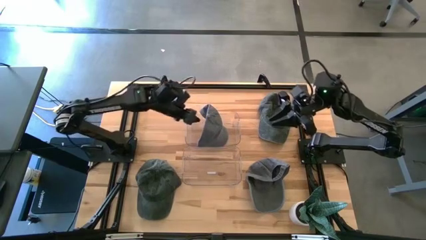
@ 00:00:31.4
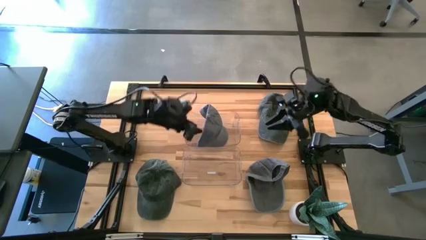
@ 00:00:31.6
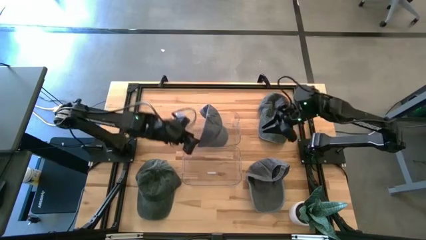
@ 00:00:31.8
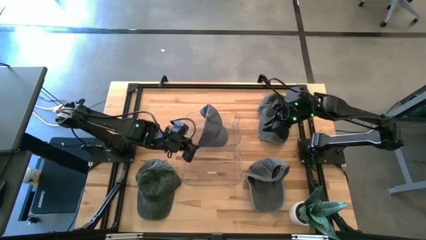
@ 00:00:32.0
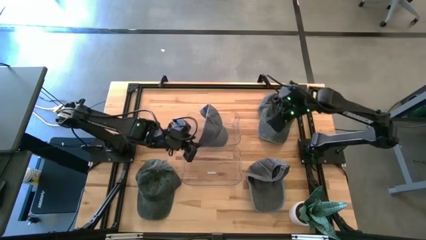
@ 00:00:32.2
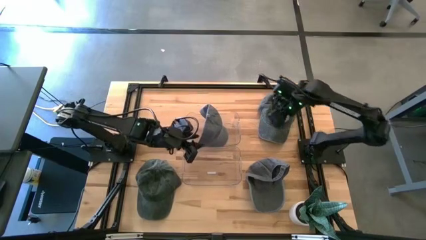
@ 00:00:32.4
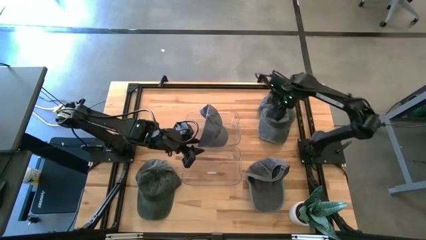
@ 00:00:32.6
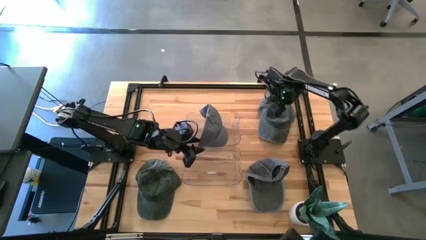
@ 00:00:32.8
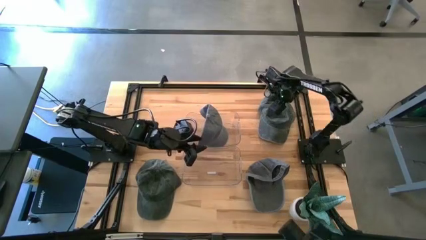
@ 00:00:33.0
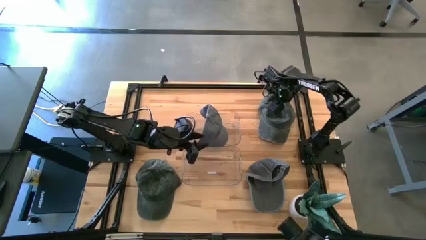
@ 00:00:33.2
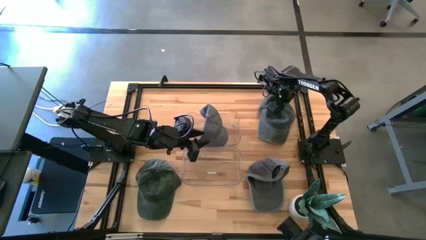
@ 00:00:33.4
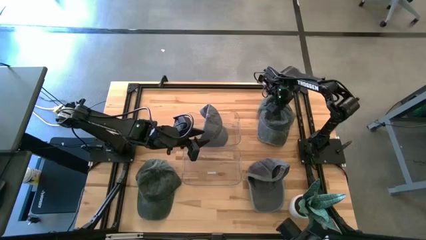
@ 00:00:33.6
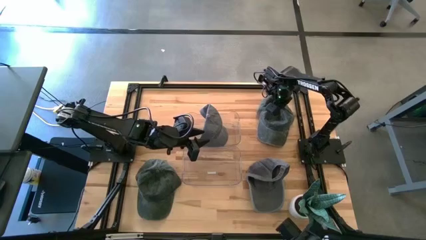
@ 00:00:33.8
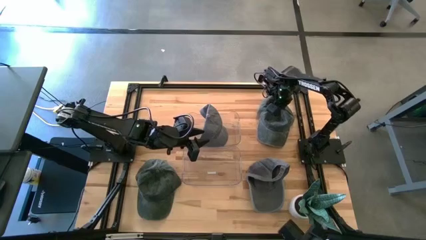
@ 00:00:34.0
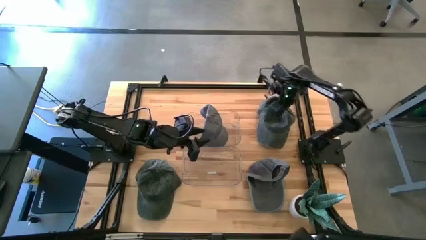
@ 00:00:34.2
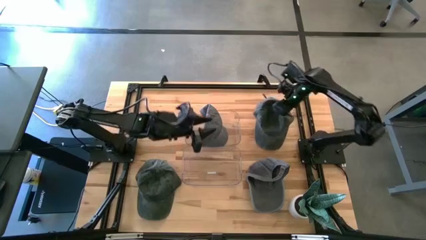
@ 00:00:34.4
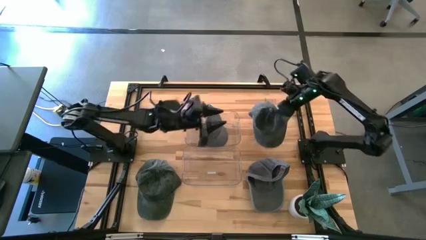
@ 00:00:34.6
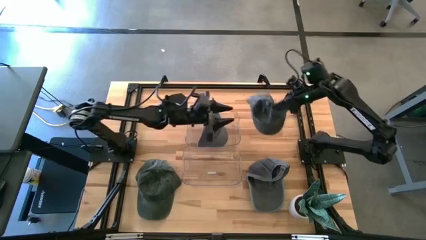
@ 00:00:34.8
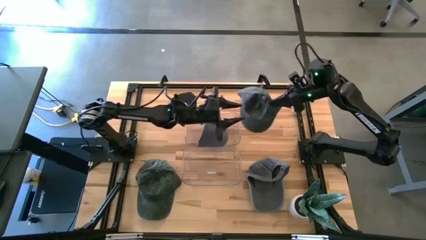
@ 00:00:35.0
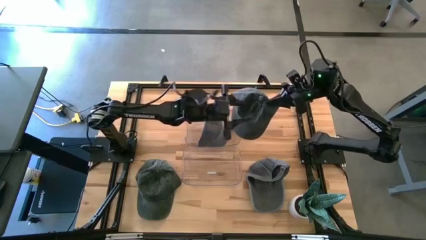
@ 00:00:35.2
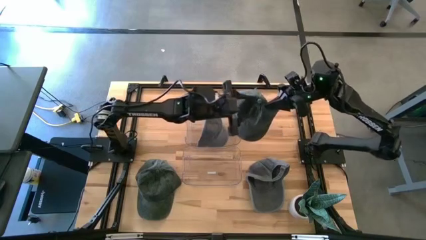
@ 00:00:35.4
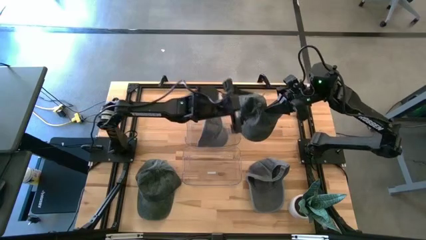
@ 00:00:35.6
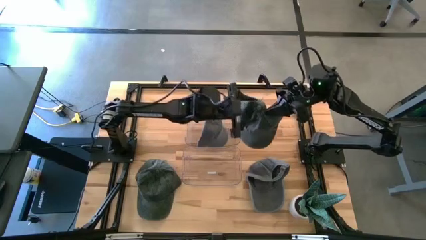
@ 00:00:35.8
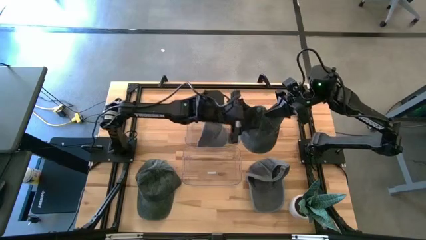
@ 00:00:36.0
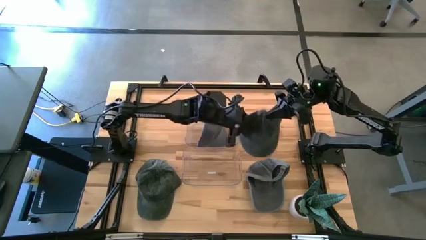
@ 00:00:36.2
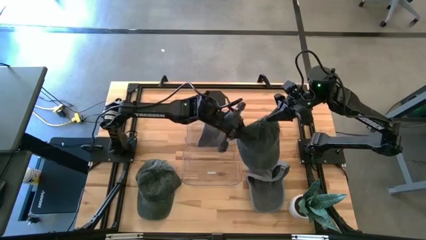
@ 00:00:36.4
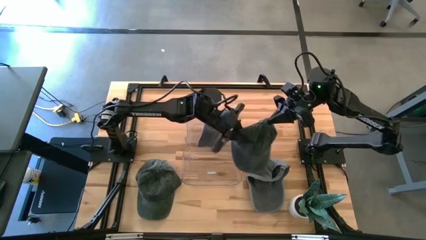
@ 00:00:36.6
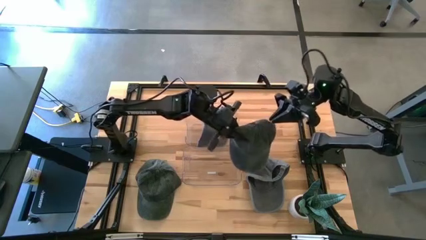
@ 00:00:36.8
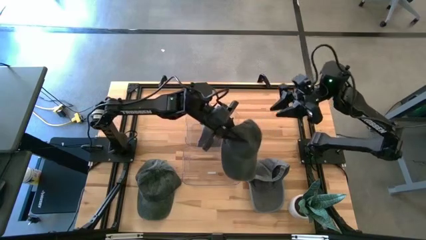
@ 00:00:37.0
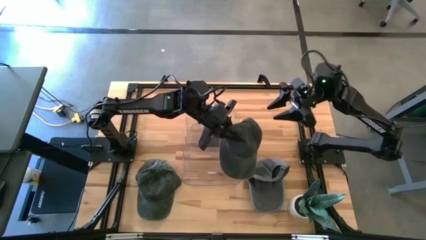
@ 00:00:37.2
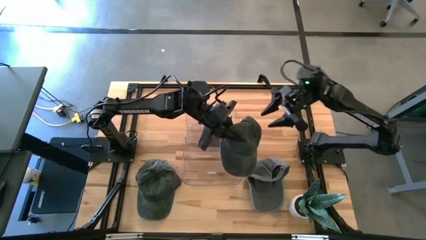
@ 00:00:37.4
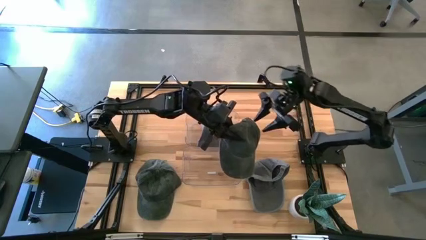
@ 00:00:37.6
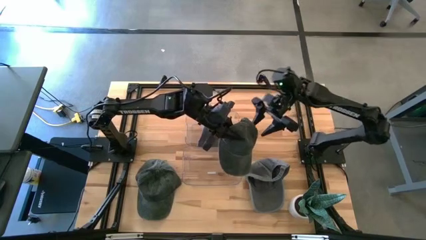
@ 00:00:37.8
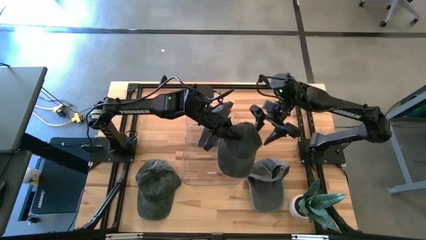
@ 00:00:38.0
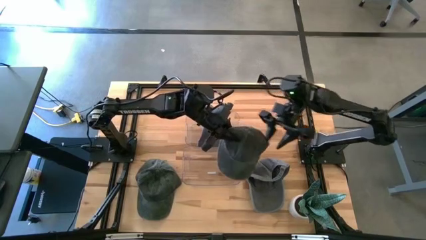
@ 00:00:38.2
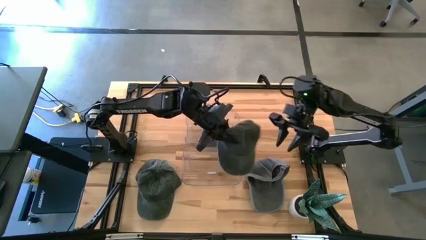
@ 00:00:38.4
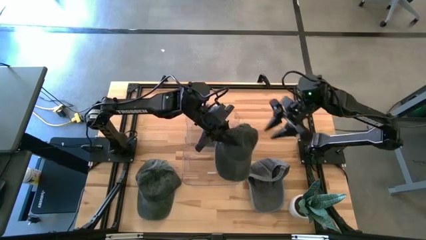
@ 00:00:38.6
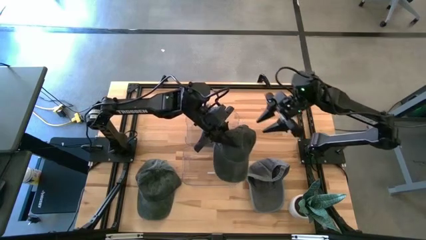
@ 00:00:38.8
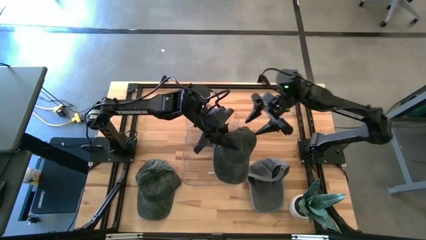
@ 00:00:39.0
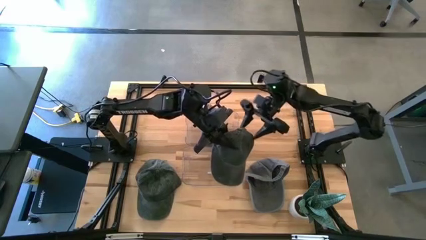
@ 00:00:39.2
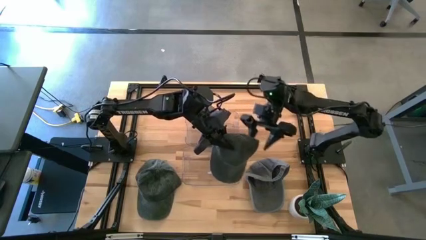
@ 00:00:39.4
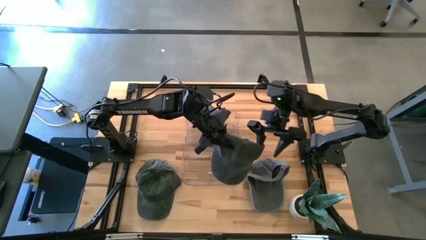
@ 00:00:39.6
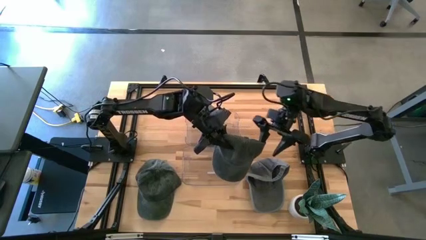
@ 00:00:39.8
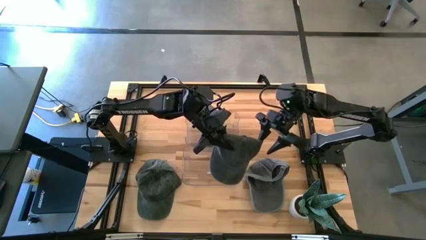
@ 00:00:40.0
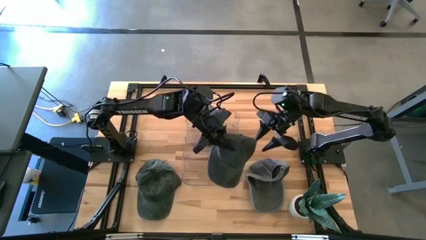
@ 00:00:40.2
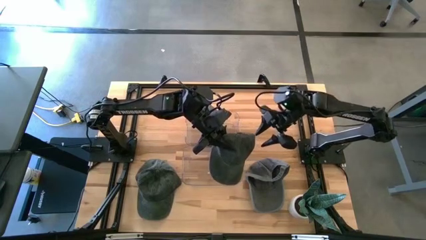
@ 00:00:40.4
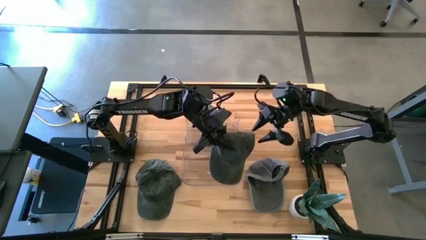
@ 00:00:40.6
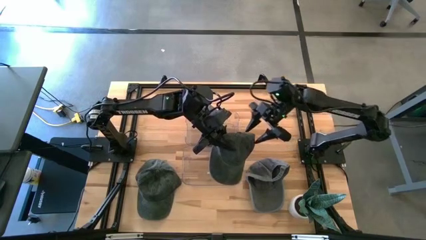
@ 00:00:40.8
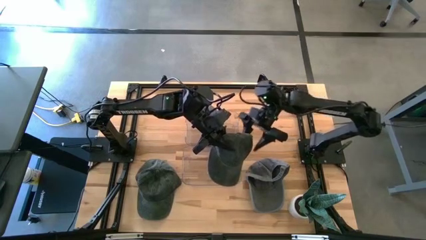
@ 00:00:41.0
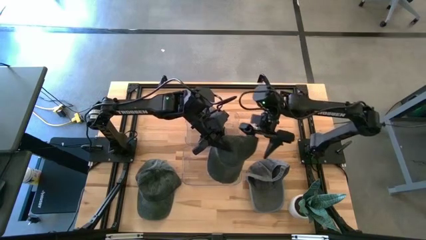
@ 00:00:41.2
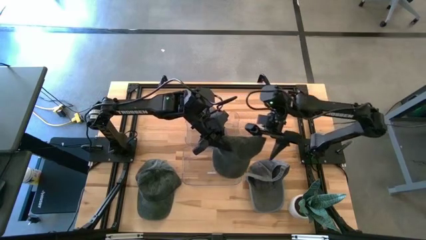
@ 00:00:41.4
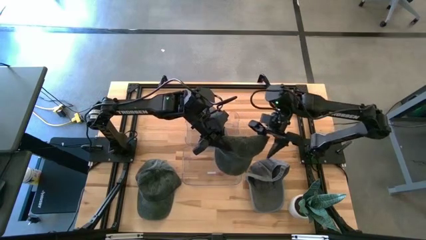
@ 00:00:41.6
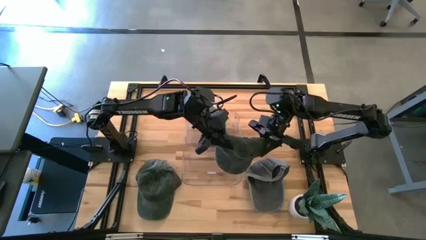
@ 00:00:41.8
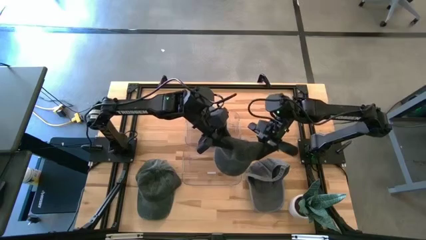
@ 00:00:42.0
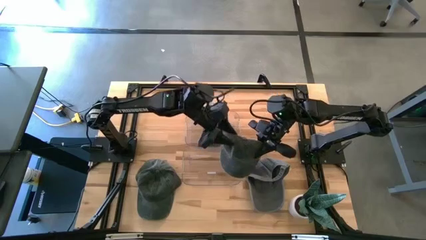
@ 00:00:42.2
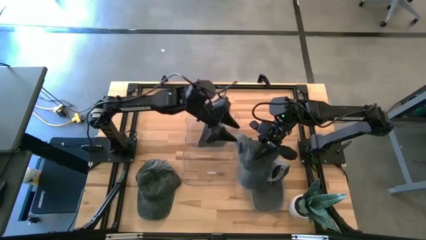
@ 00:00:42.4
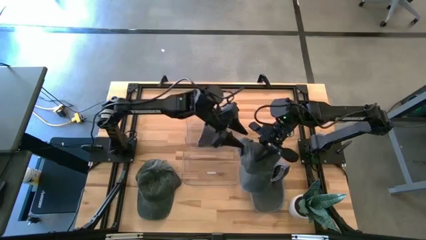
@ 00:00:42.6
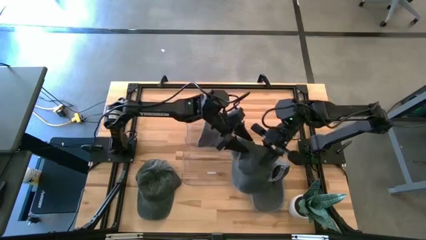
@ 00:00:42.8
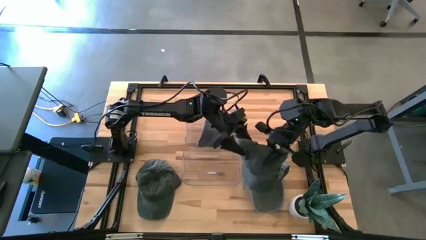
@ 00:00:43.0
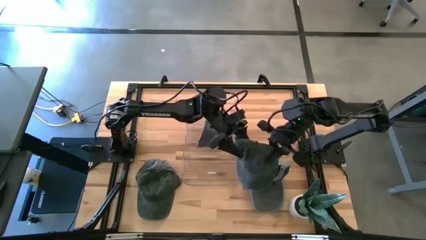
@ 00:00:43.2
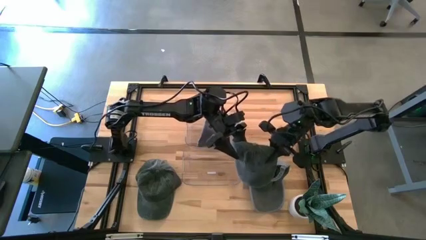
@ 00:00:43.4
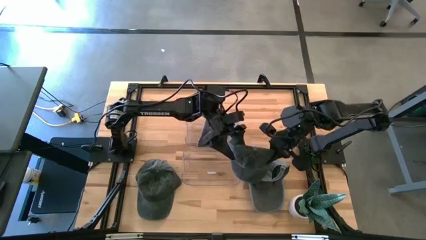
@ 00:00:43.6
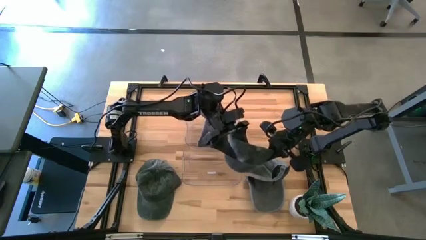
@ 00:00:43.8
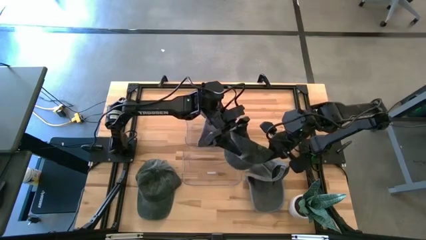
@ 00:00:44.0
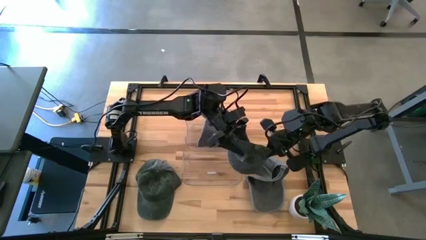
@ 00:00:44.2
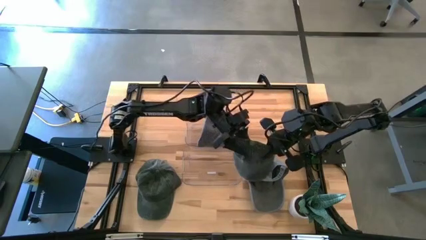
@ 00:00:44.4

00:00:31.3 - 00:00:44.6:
Task: Pick & Place hat
Put the top black cap into the bottom transparent bin

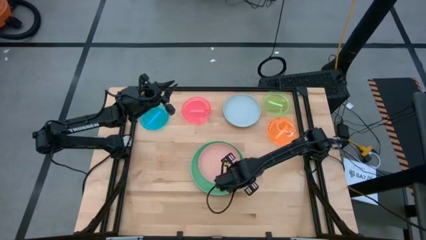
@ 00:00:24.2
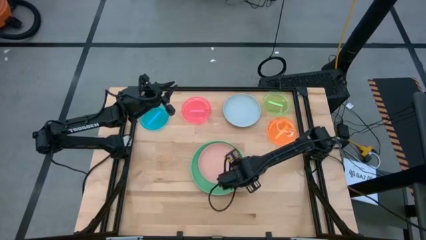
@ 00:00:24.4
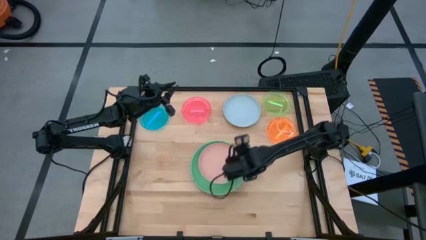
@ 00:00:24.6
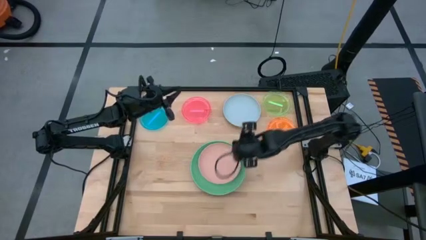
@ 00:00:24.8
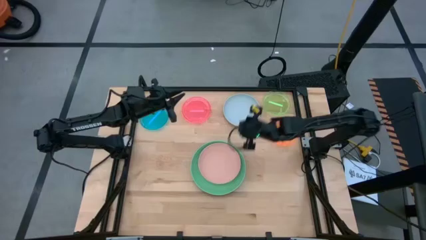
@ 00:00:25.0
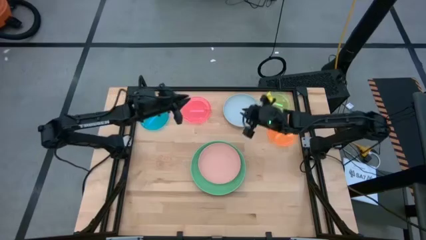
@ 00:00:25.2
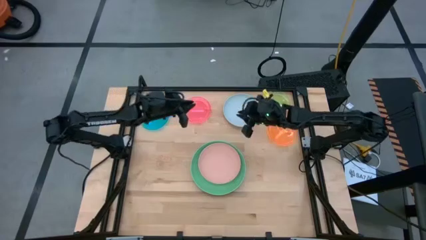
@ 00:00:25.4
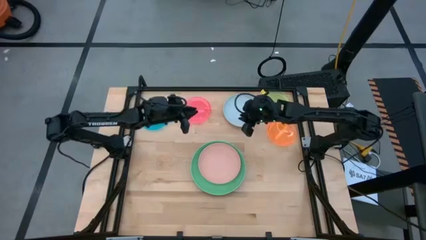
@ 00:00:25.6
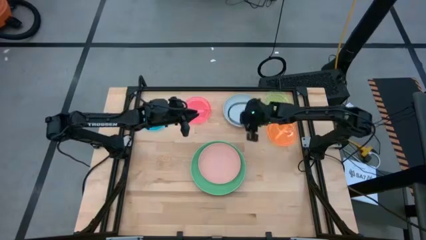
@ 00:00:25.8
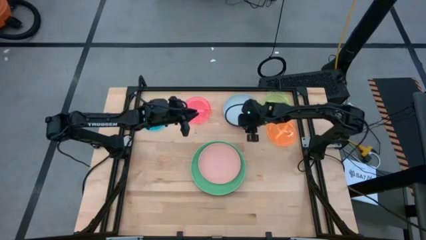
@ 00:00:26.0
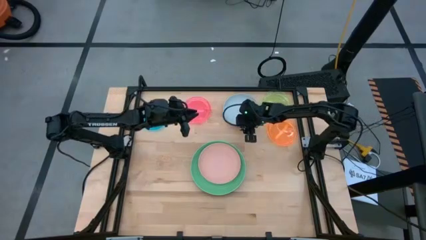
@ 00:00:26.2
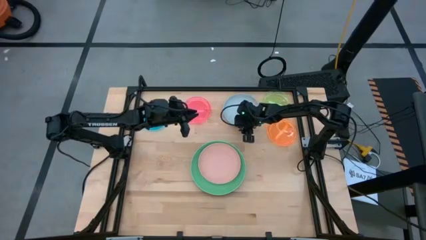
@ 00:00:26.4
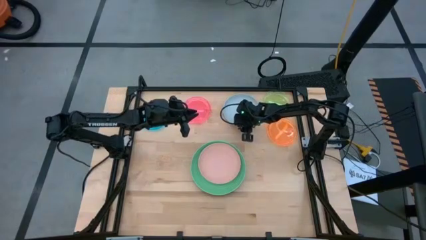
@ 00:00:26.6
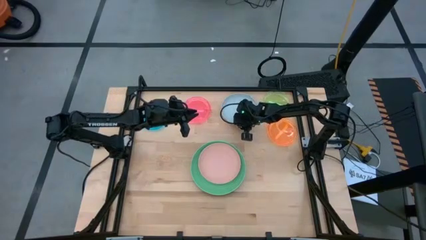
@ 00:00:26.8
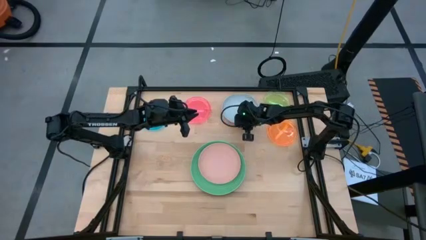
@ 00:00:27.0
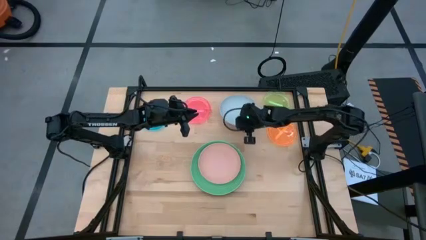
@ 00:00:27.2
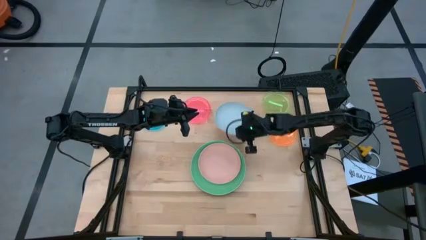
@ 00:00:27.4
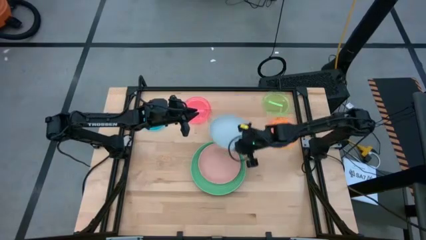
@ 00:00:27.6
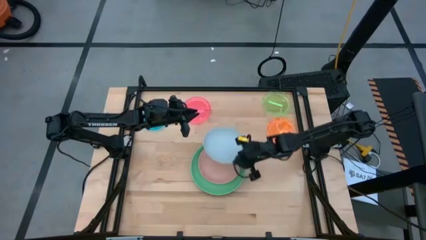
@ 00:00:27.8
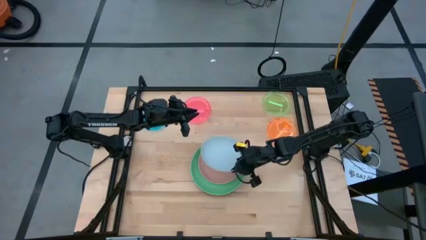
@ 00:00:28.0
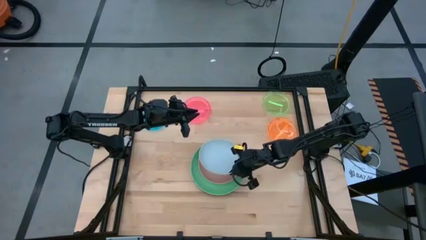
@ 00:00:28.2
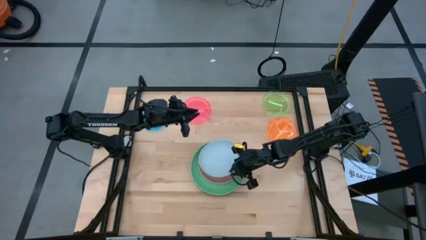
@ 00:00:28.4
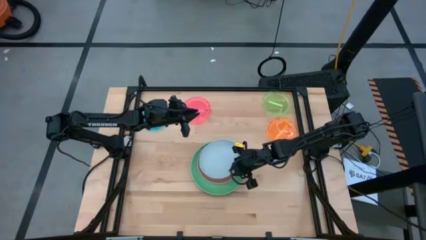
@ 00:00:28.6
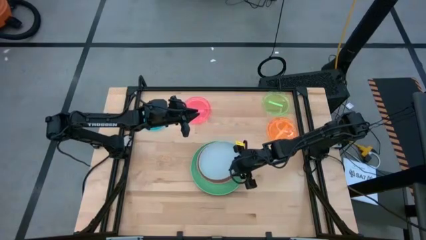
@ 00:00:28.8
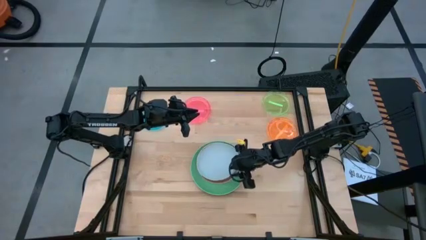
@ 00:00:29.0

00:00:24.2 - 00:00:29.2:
Task: Stack plastic plates
Stack the blue plate on the pink plate
